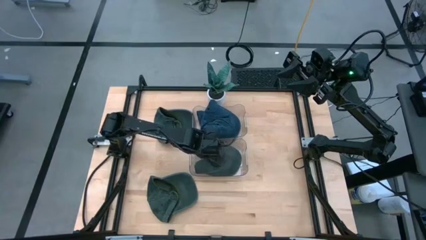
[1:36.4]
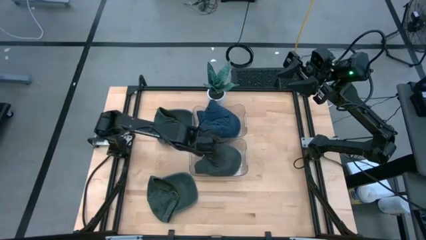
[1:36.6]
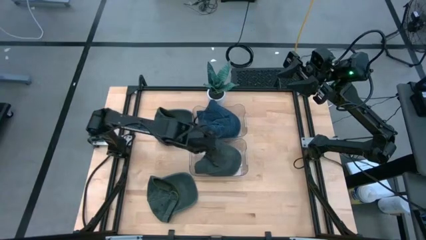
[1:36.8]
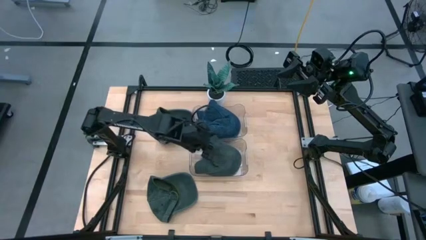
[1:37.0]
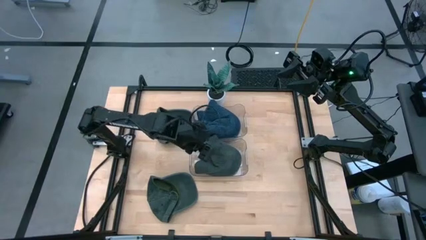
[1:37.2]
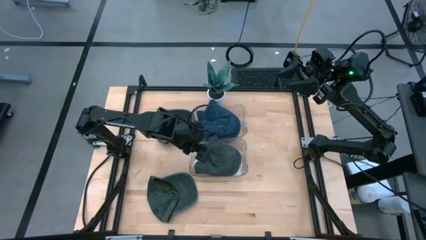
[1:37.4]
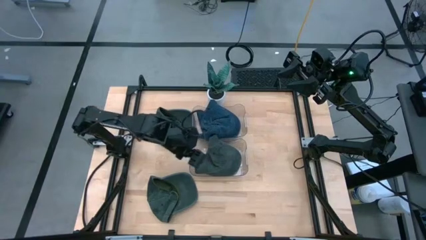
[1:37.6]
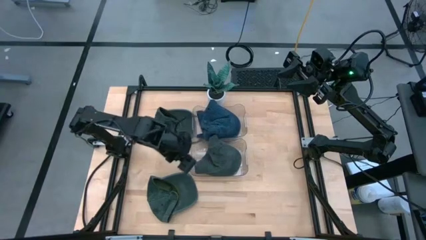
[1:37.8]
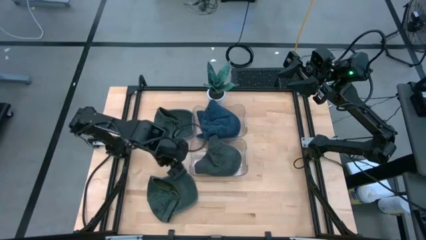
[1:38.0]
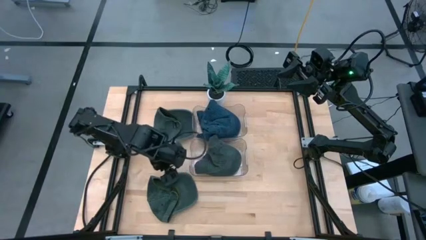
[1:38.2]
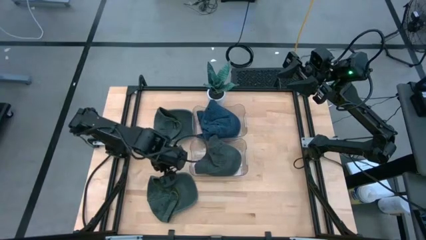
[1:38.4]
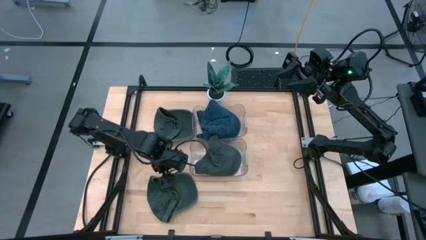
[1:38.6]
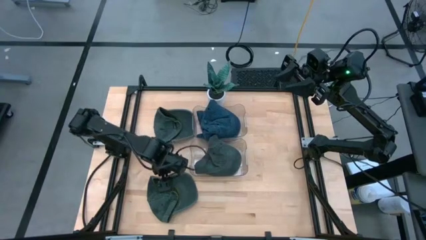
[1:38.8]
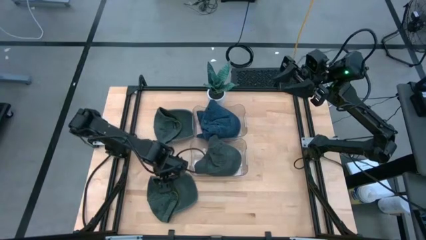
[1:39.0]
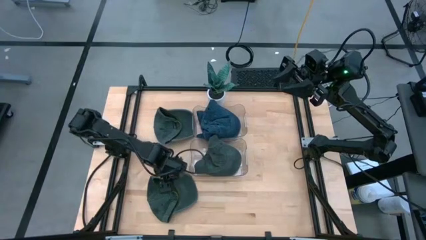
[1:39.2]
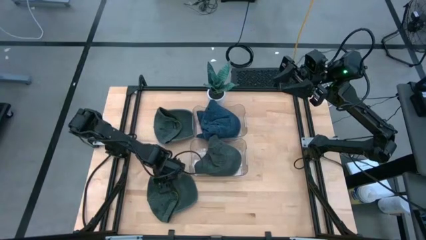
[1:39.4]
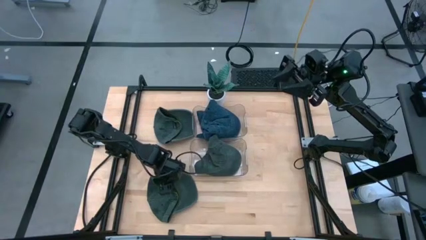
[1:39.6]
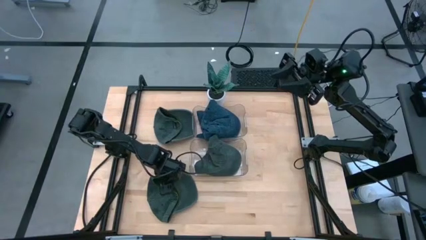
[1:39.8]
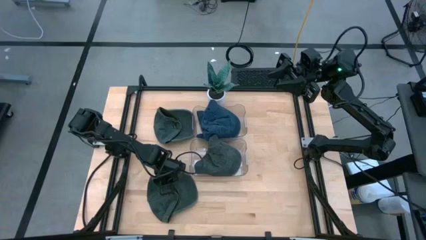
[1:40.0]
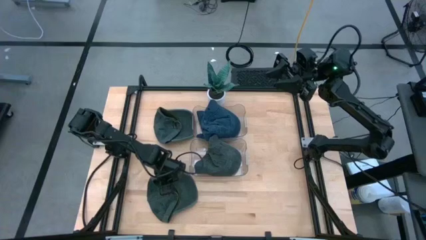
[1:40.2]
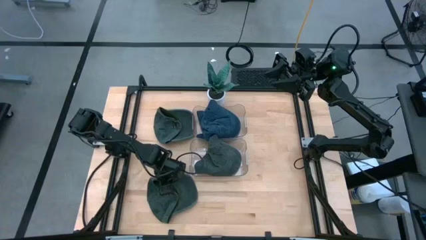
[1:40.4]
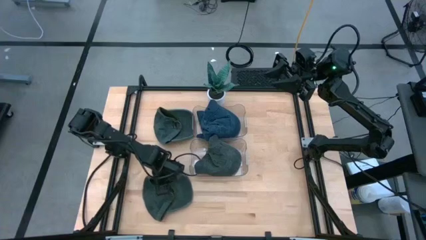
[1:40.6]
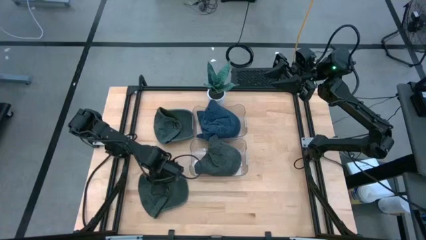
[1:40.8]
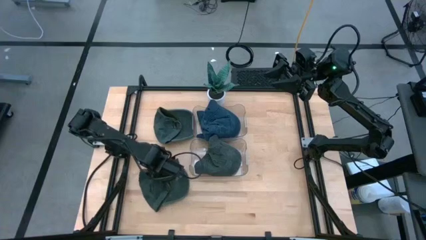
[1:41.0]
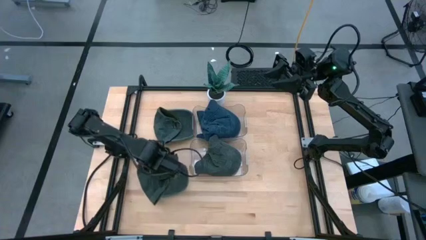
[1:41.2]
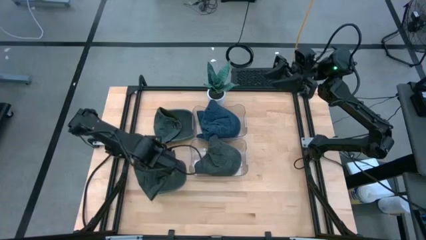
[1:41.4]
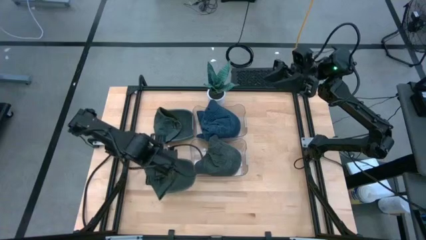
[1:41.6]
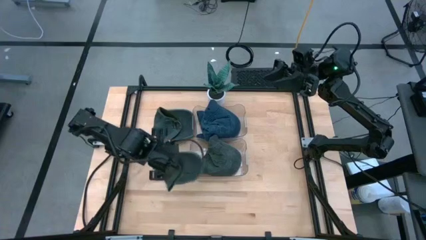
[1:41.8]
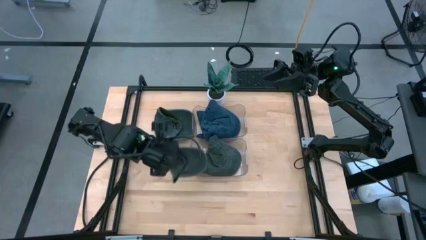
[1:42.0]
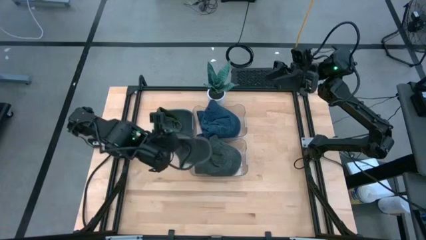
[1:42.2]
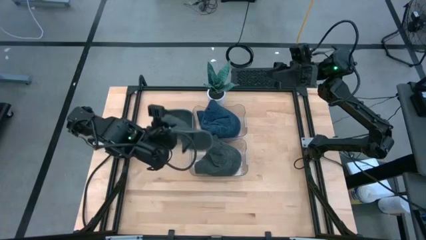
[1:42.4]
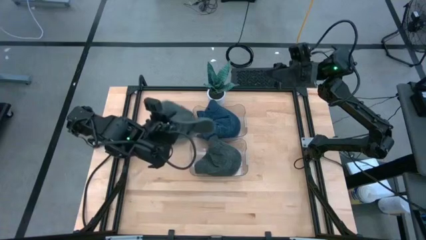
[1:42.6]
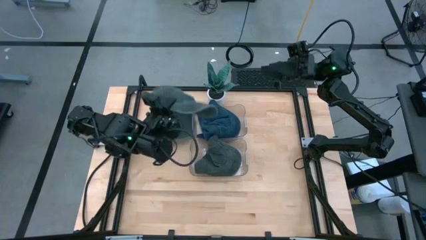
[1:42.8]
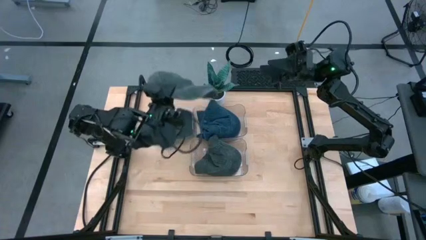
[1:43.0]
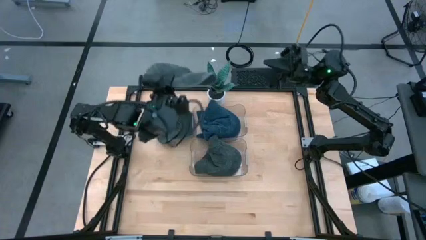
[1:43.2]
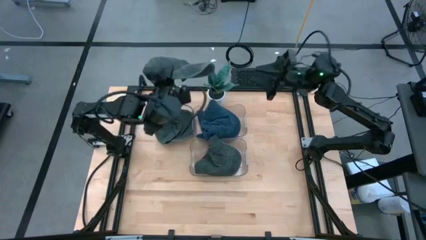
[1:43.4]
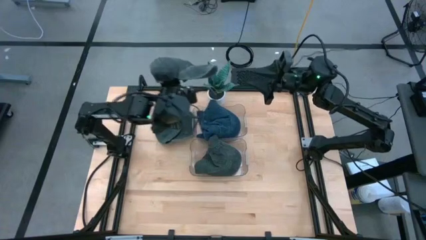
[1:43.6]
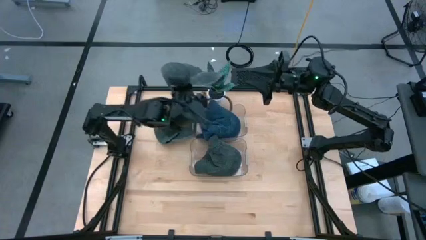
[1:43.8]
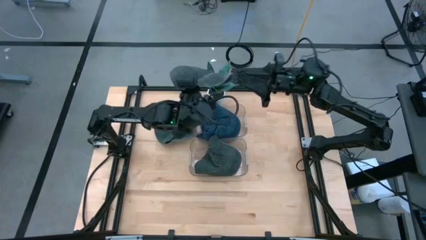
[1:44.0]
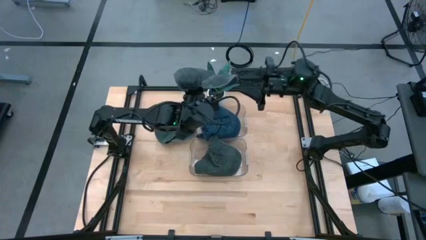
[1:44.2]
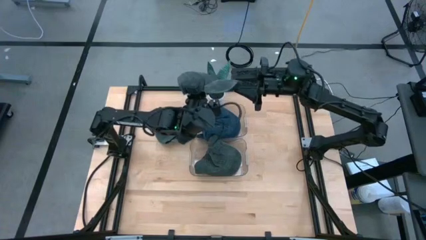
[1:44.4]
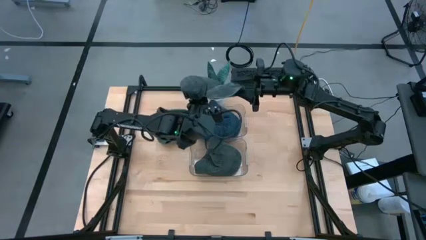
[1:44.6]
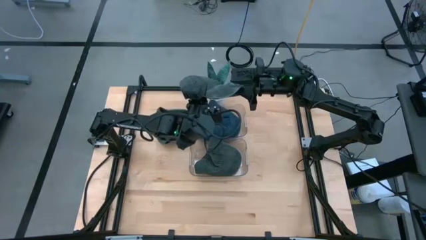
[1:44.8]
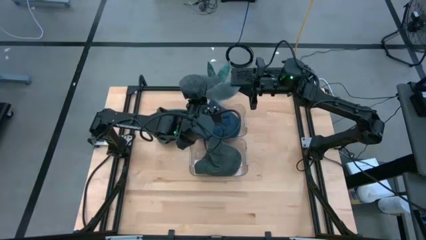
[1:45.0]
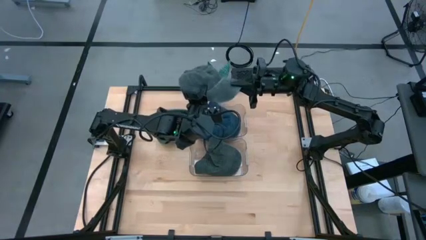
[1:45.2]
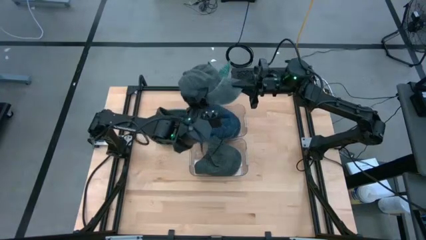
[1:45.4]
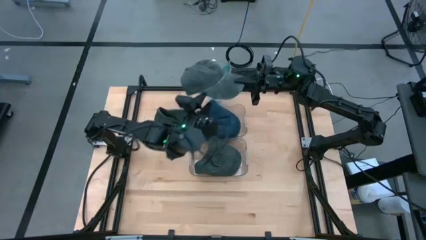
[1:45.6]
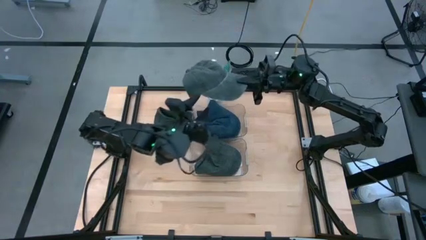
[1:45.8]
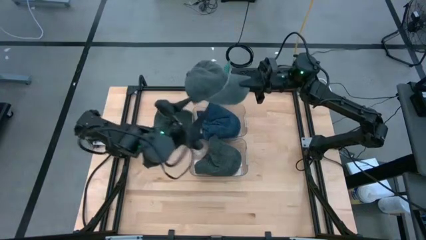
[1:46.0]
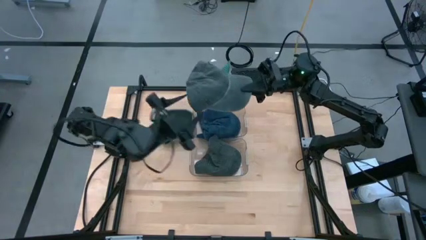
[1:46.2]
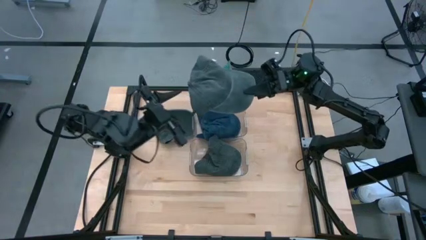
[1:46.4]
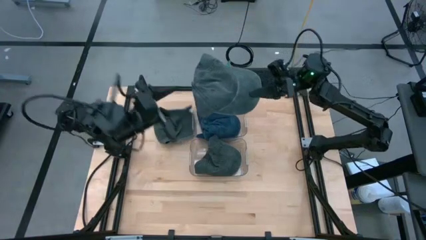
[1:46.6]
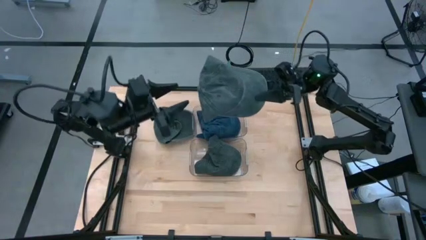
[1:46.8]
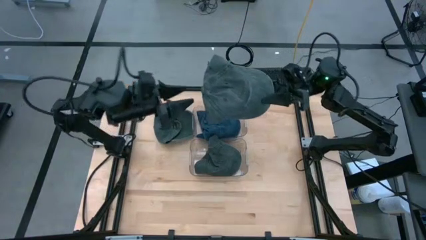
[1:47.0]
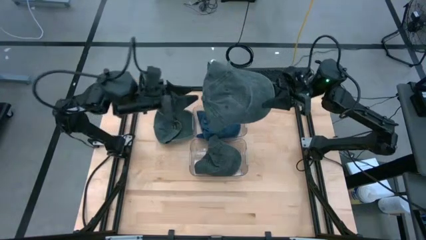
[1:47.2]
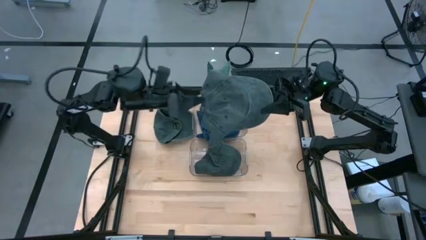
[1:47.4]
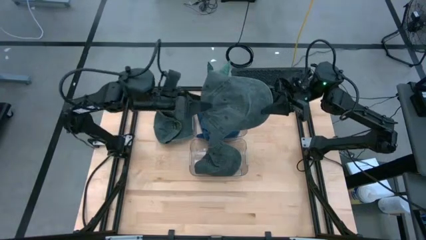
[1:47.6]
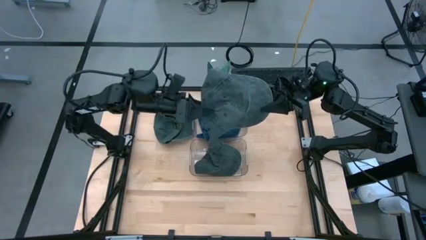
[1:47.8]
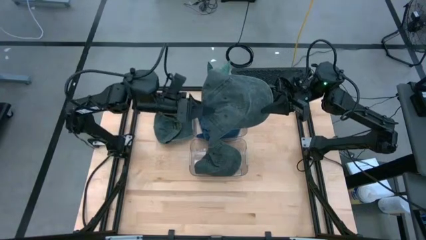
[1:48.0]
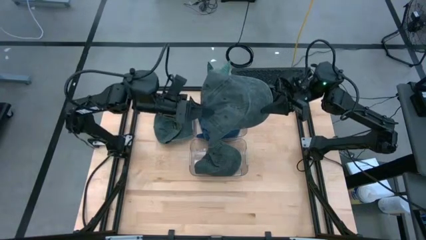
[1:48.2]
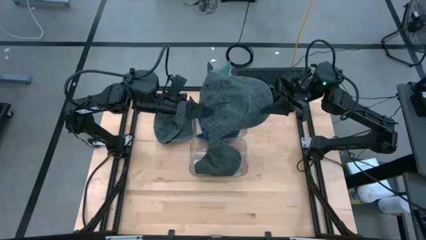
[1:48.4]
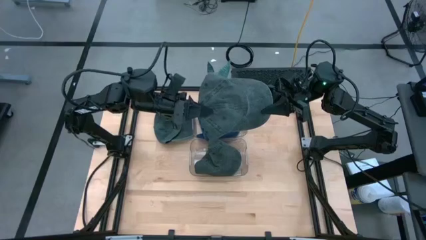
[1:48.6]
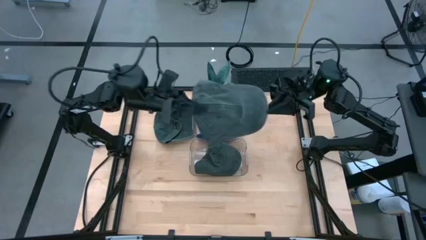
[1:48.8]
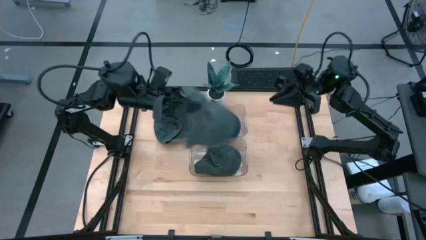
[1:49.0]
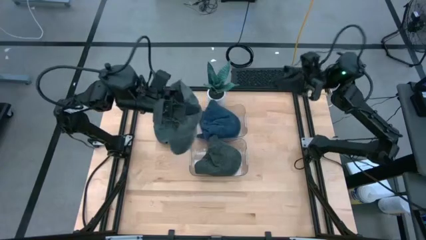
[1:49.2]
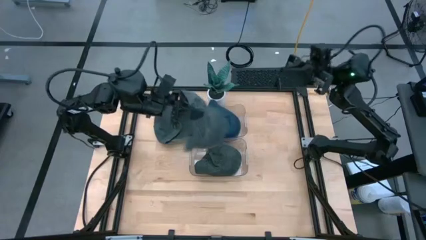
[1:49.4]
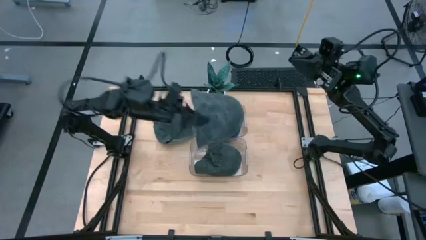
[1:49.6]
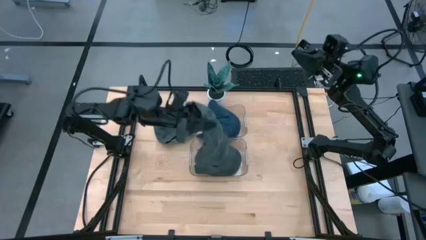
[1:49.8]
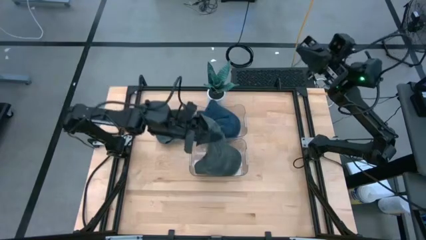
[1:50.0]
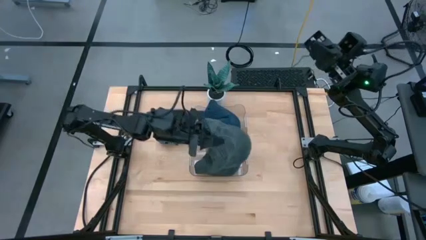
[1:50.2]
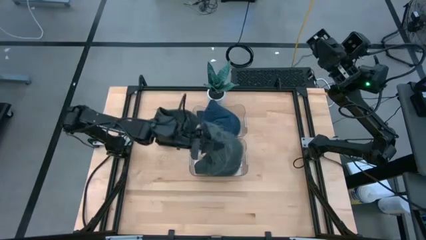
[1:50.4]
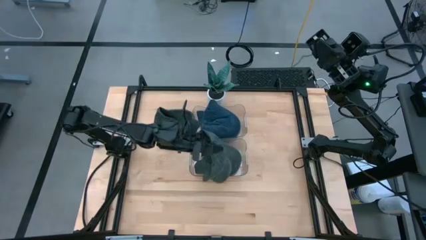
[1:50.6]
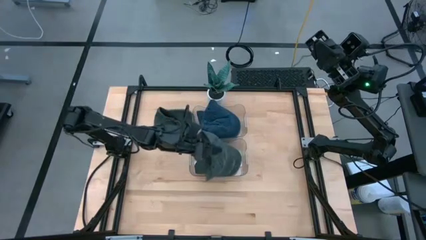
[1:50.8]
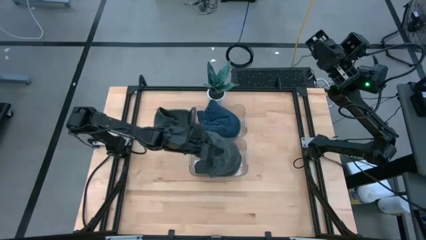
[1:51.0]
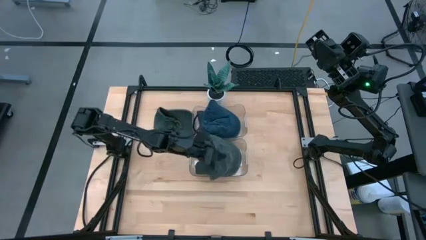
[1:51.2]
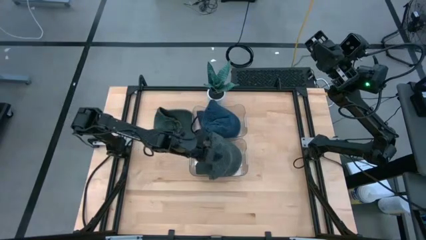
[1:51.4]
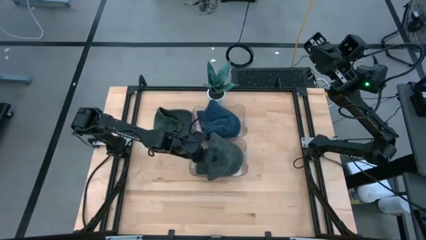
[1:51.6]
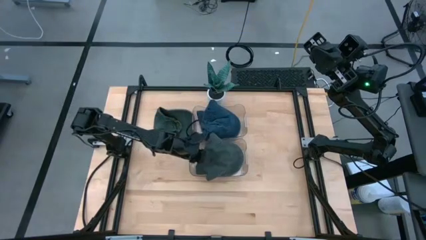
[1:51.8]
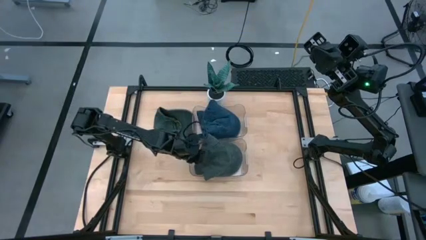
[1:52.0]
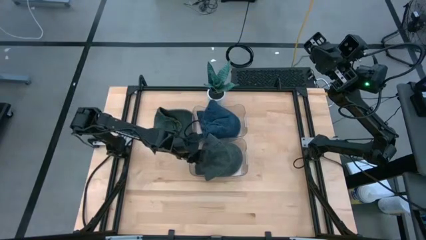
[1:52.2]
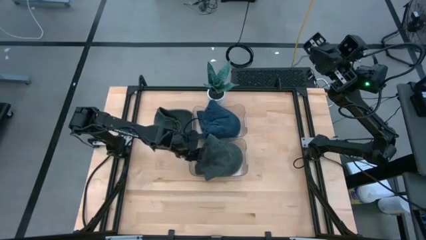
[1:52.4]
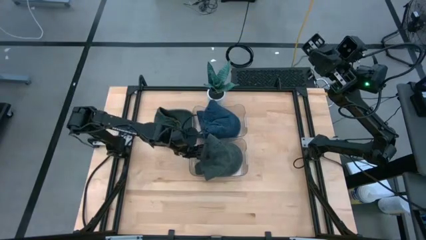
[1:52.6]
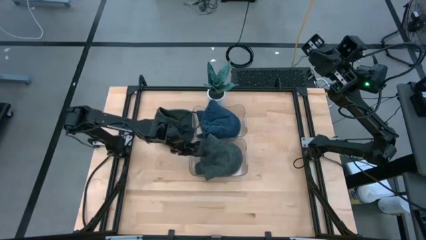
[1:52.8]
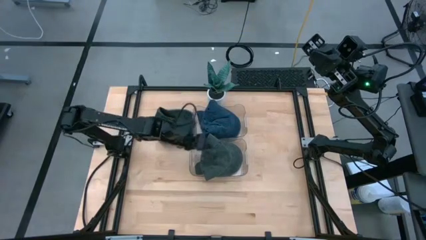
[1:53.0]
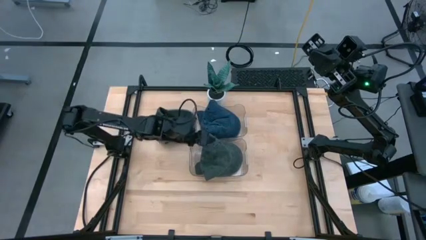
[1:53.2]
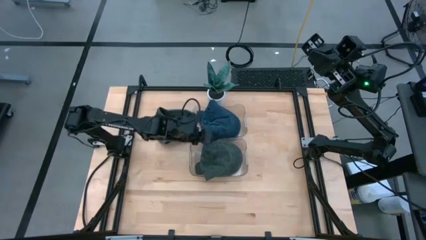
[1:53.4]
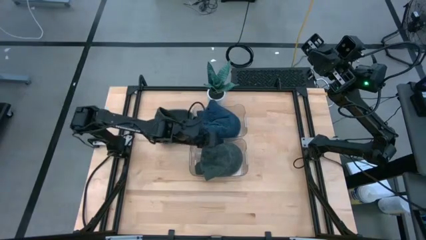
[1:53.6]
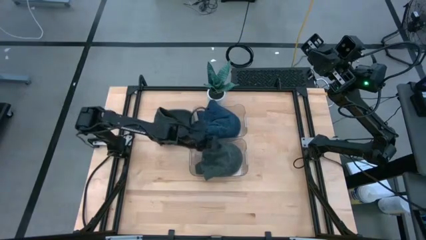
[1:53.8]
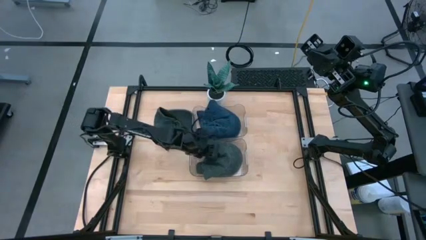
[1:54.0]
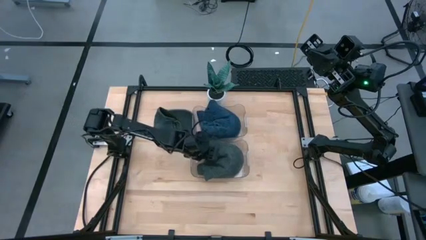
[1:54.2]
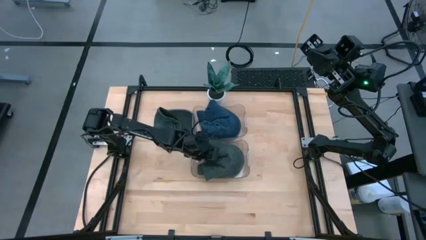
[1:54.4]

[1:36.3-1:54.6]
Task: Pick & Place hat
Put the bottom black cap into the bottom transparent bin
